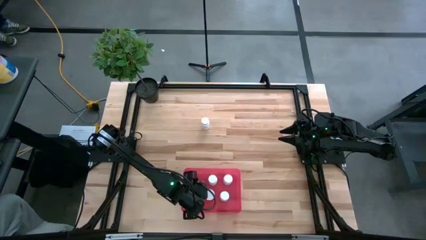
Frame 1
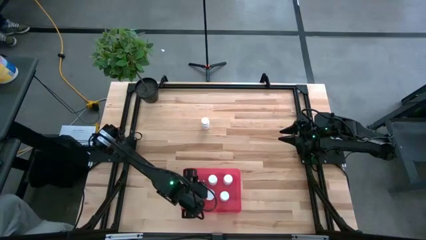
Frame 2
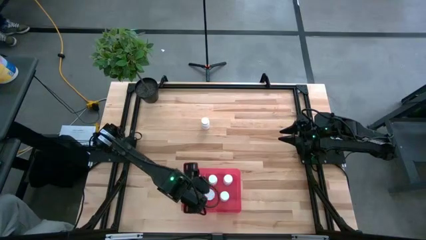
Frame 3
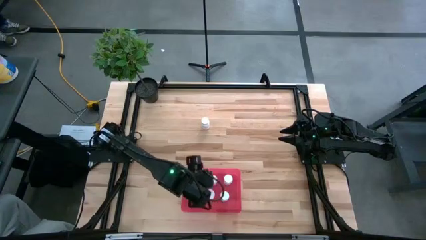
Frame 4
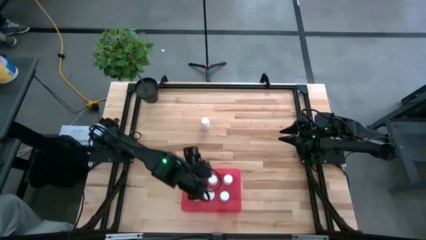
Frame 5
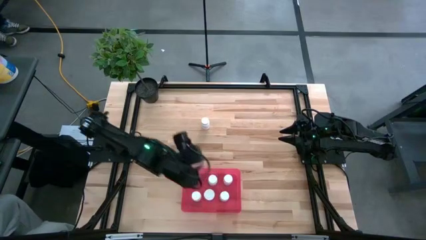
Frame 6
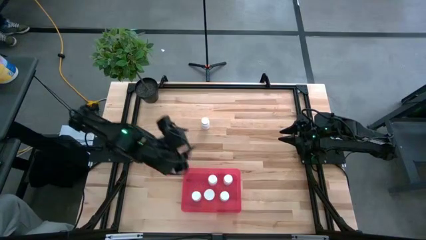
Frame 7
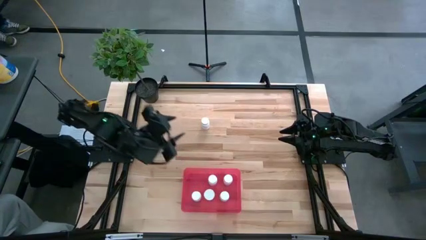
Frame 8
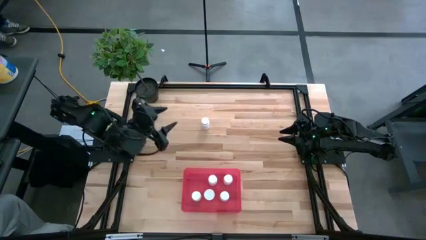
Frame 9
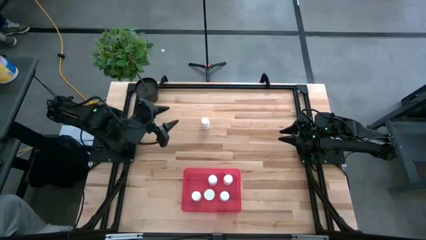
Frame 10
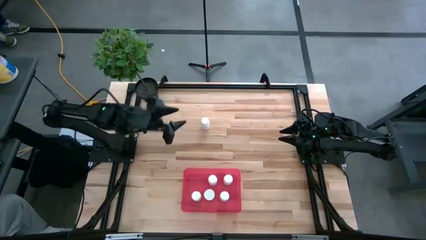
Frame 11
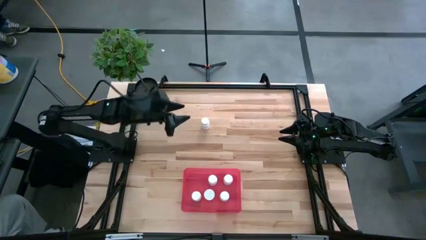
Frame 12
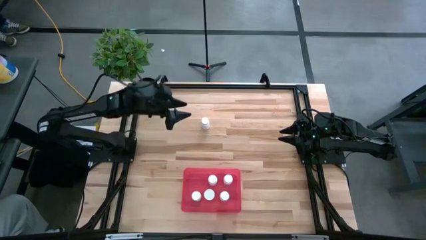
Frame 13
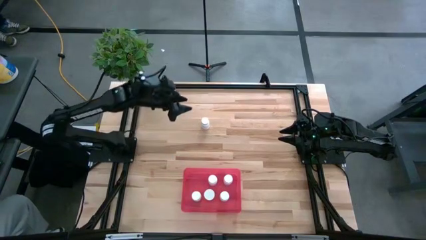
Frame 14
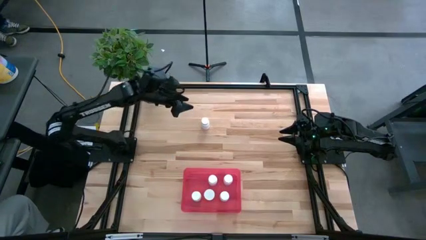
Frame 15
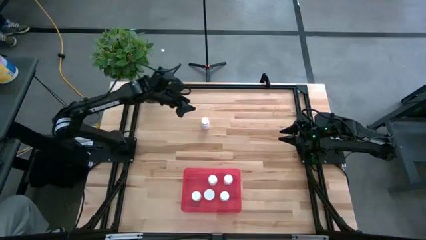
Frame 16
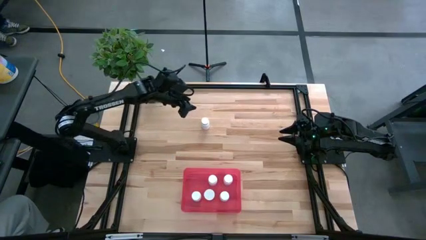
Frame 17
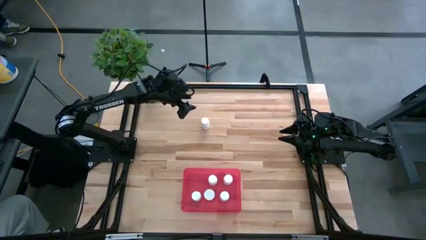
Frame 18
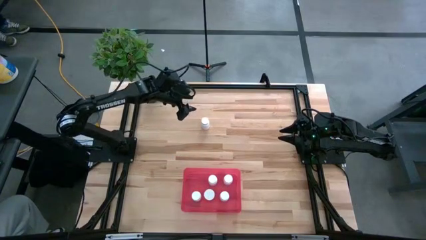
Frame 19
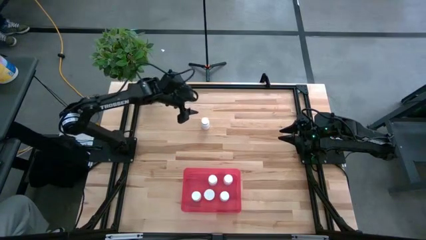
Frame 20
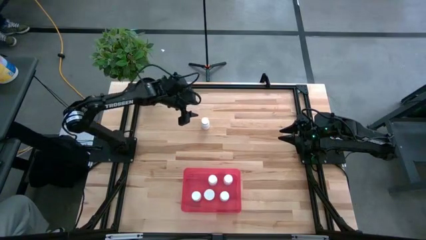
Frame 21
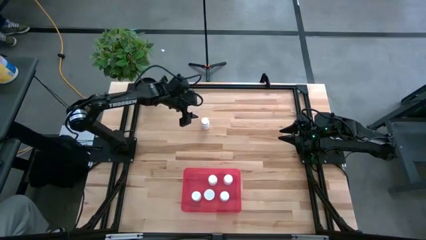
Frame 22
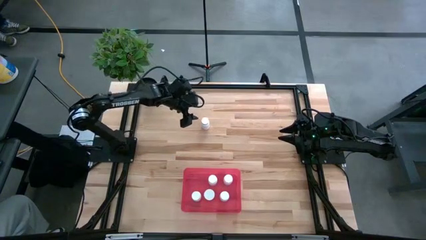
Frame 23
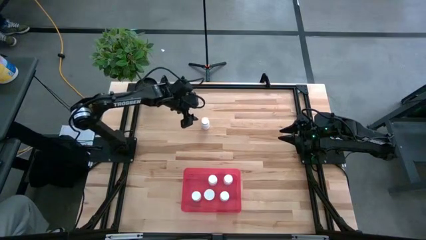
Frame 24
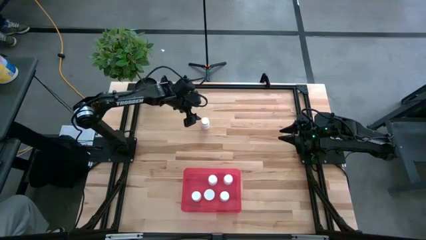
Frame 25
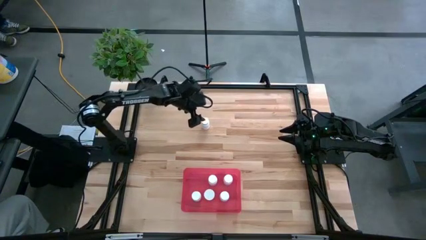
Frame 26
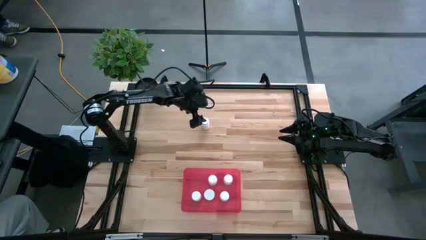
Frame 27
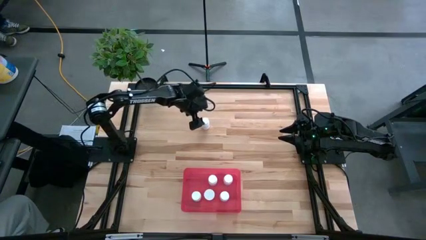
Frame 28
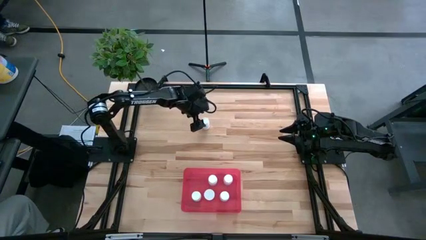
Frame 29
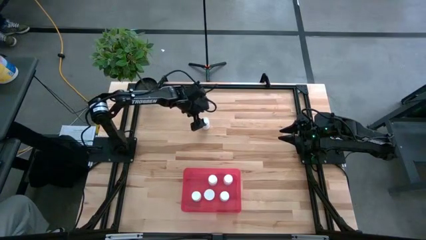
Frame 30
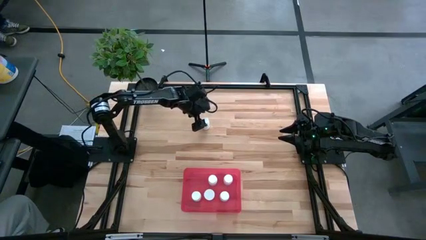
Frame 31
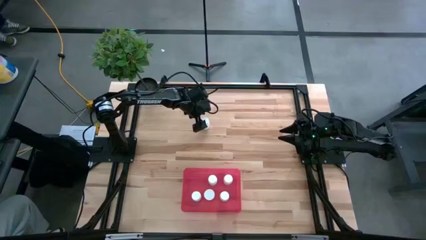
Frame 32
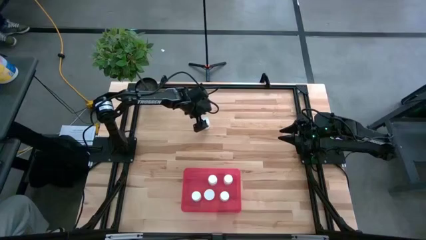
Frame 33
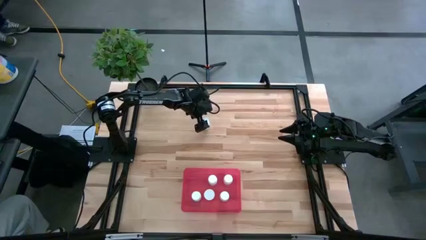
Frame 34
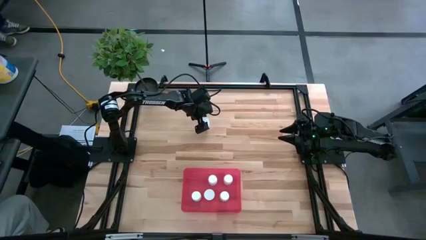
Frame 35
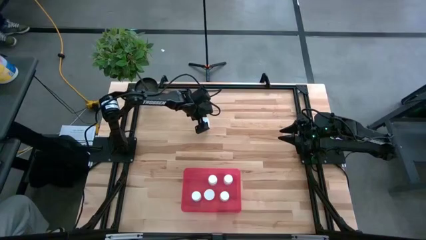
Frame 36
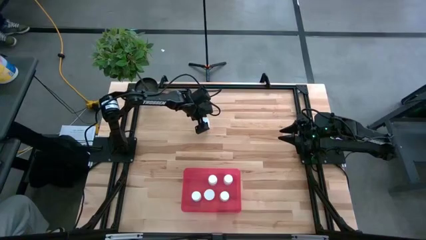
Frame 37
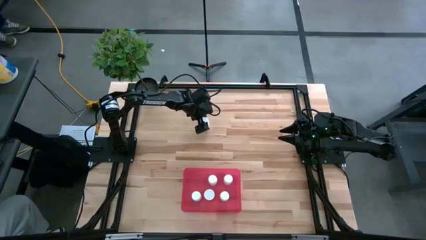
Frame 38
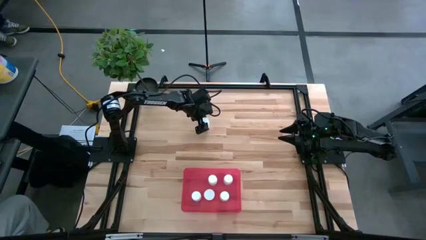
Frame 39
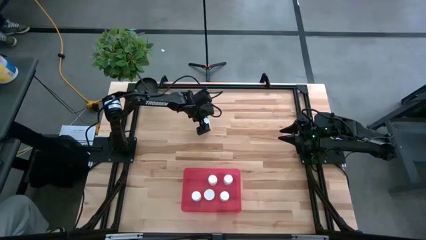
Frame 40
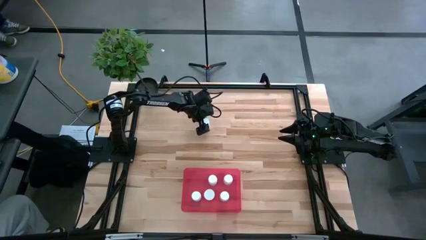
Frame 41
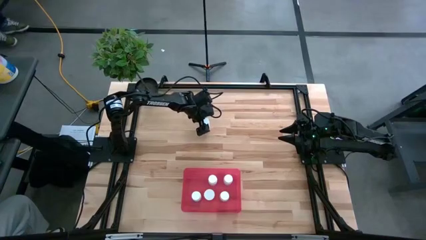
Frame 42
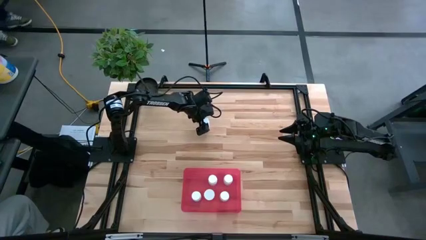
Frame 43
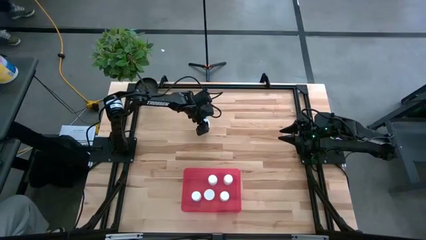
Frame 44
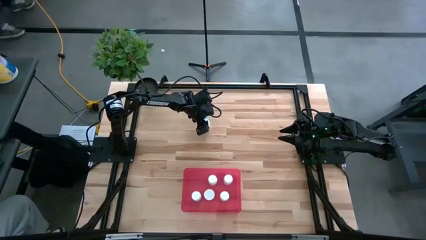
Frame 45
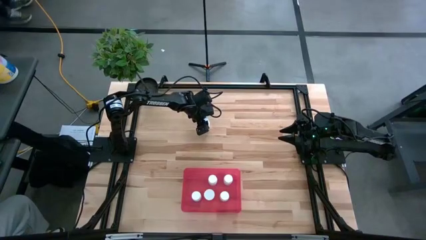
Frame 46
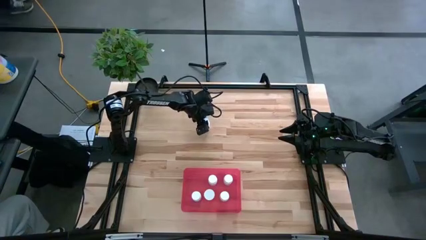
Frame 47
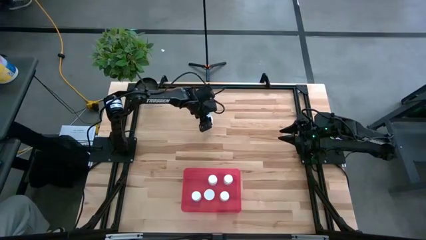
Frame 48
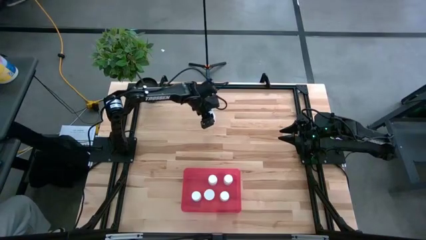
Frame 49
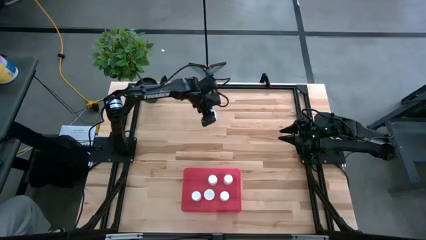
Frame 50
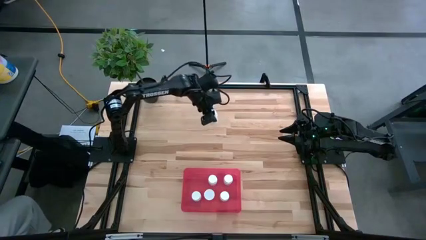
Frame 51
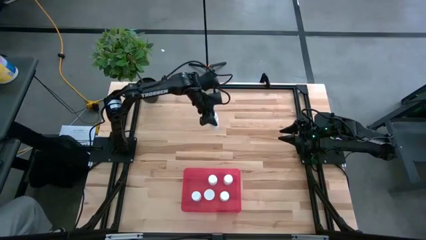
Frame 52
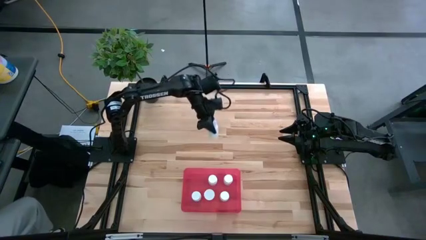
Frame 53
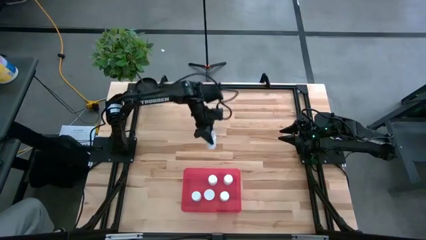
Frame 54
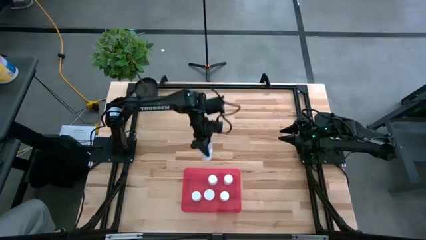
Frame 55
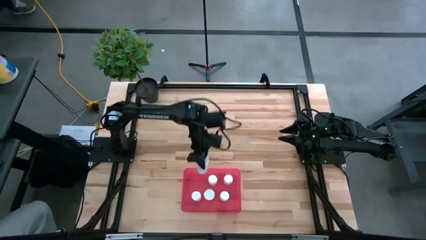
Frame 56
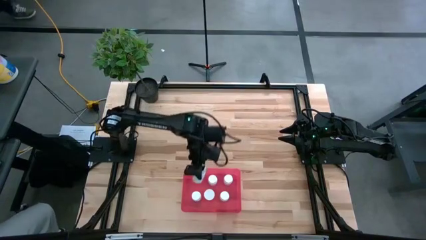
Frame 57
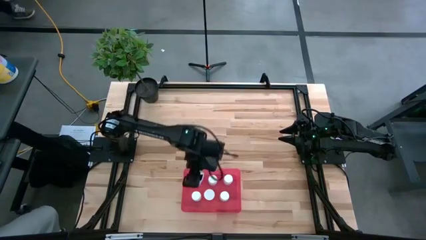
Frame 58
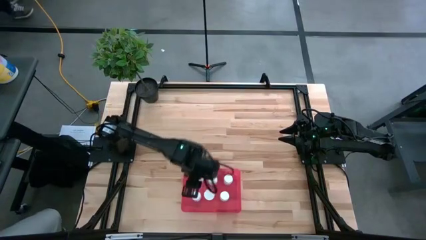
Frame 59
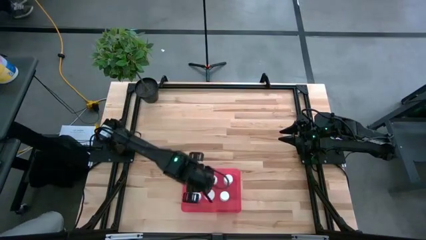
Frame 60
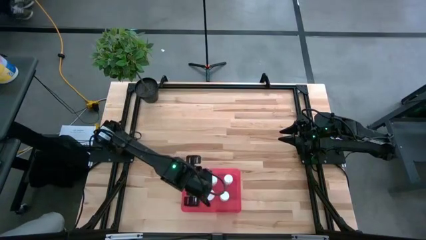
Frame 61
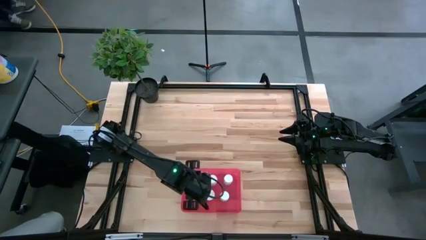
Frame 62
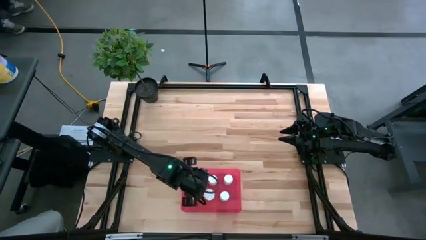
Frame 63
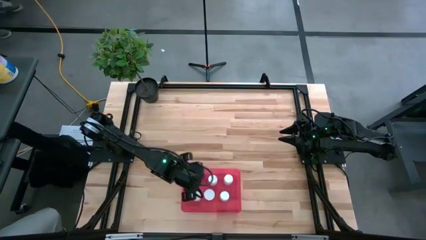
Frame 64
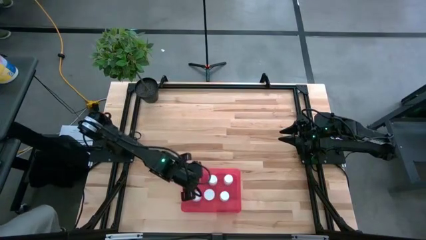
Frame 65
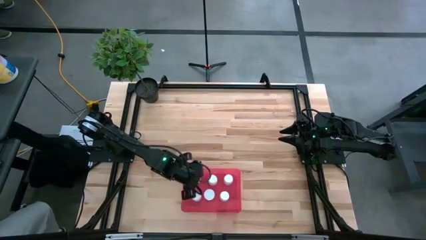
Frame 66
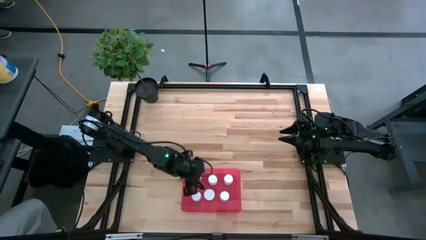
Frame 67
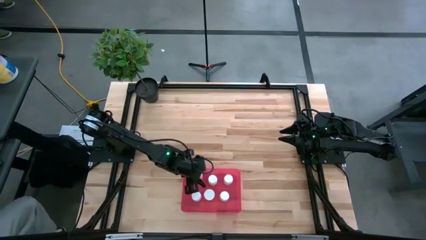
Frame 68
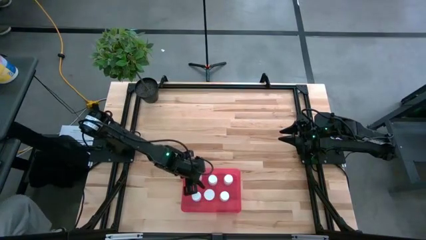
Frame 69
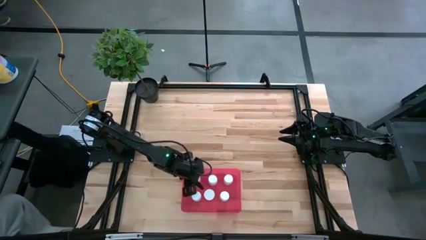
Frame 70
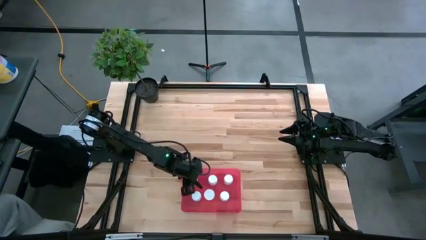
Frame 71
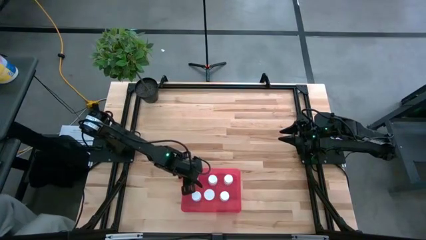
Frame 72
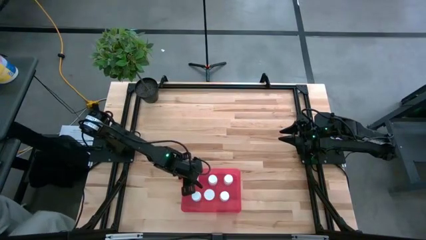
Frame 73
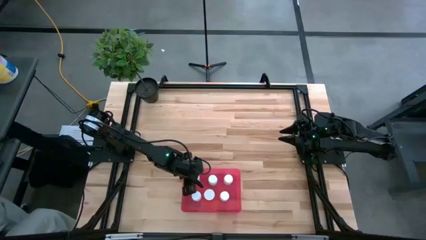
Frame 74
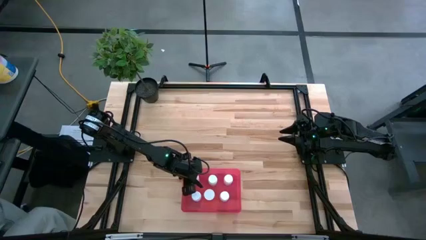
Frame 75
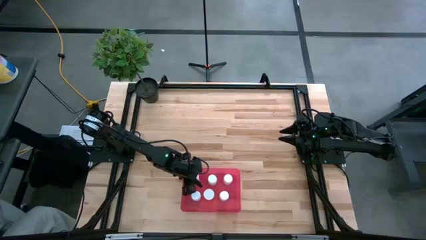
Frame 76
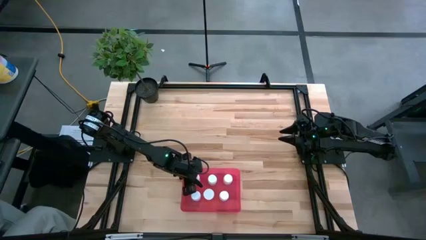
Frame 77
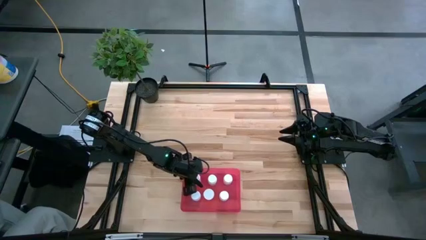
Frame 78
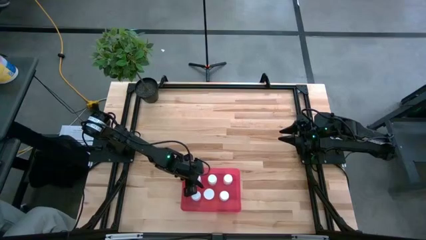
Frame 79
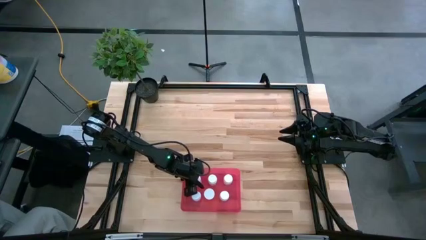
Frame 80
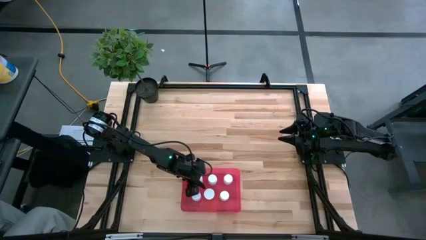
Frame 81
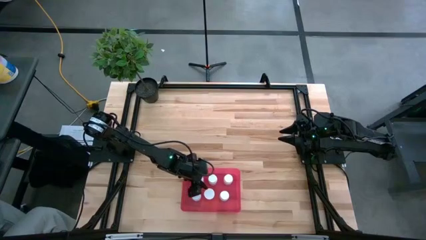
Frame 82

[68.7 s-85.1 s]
Task: Pick and place pill bottles into a basket
Put the white pill bottle into the bin
